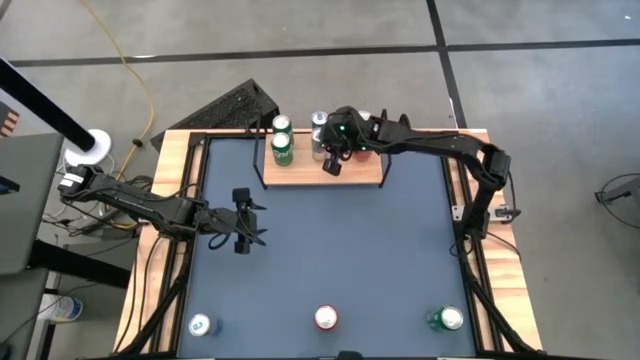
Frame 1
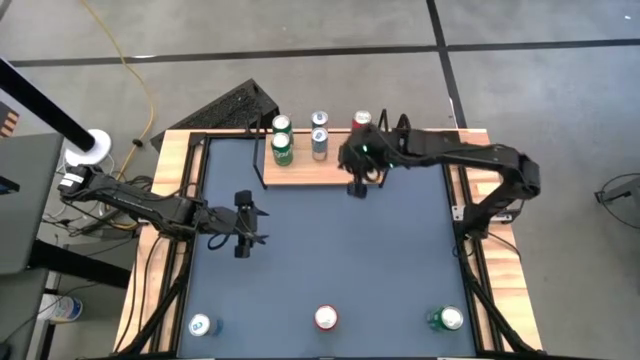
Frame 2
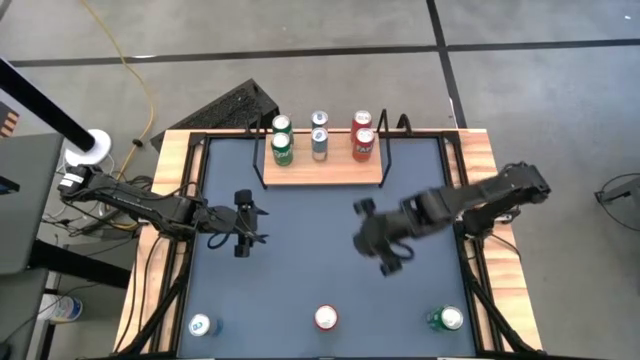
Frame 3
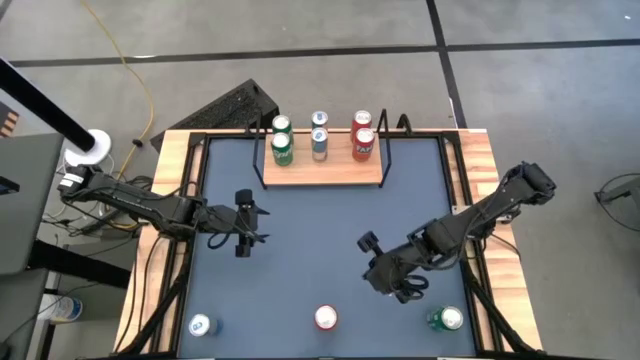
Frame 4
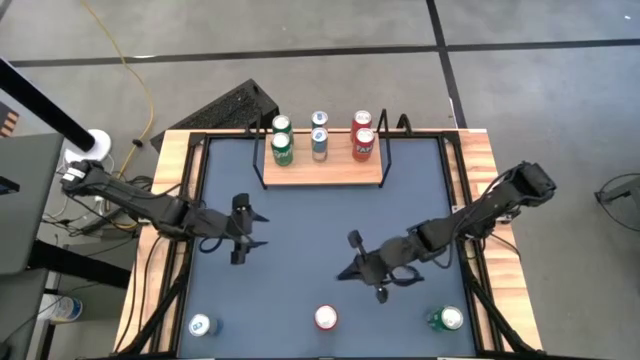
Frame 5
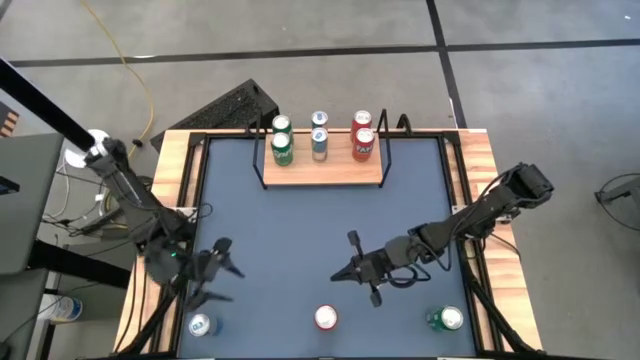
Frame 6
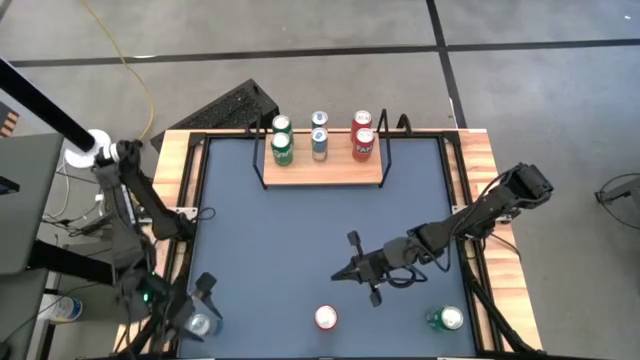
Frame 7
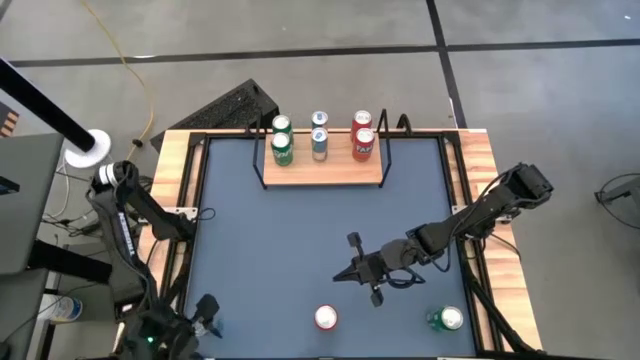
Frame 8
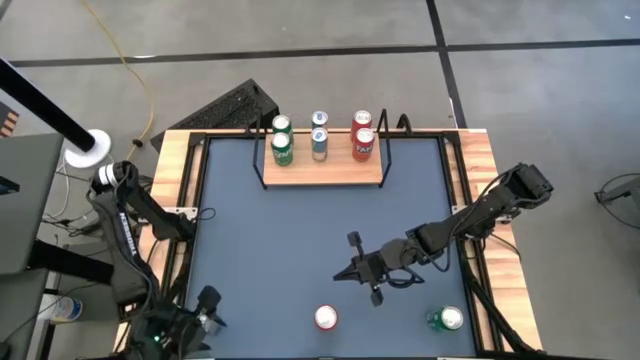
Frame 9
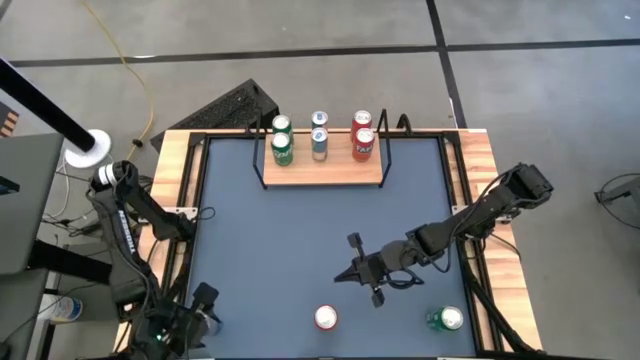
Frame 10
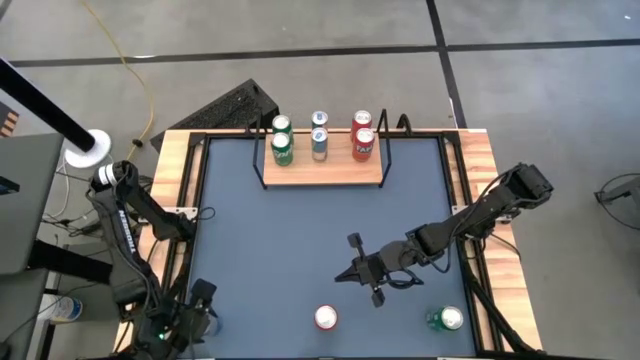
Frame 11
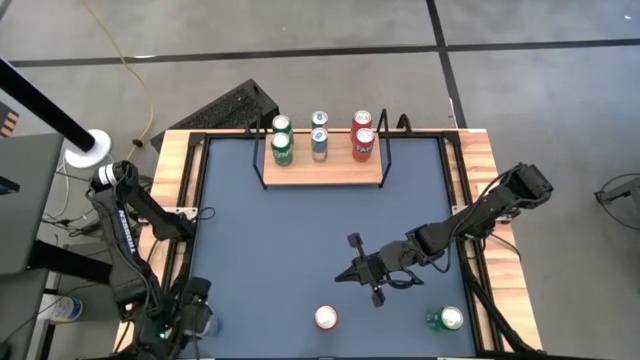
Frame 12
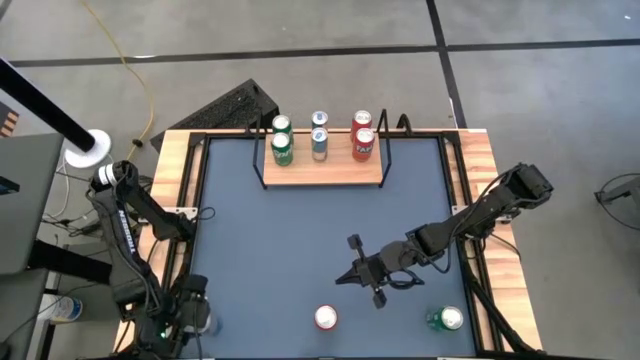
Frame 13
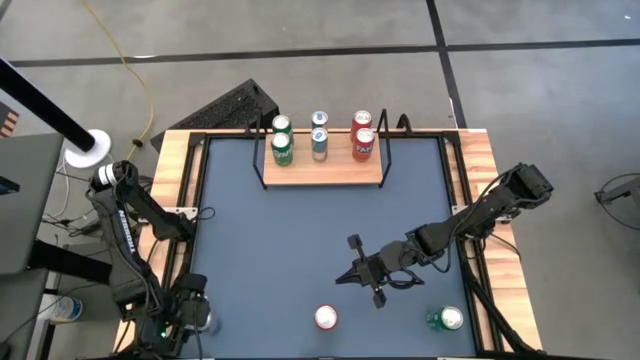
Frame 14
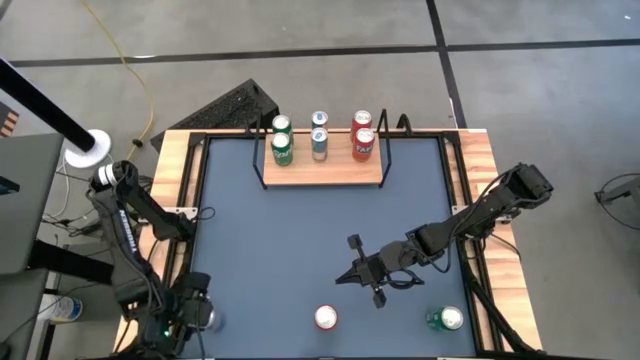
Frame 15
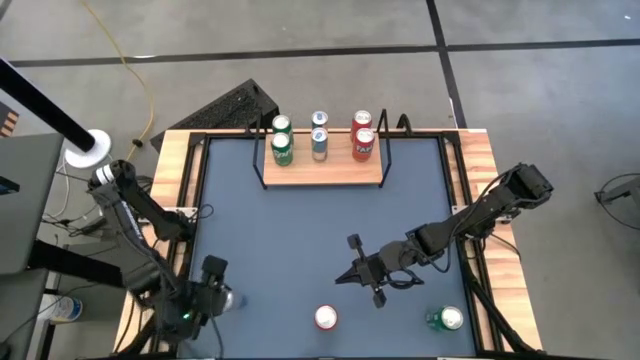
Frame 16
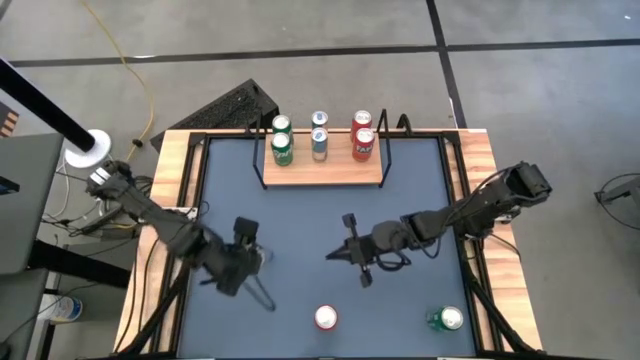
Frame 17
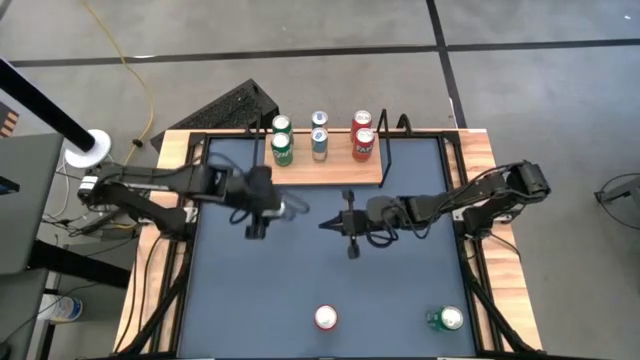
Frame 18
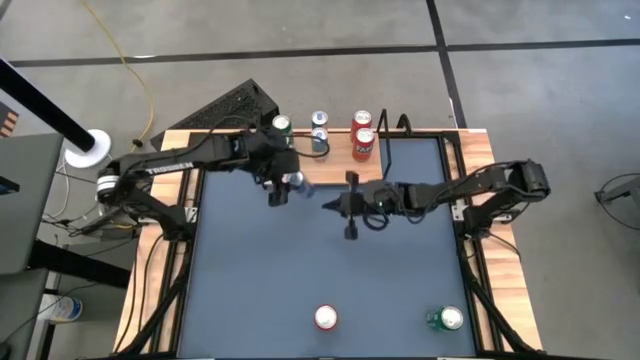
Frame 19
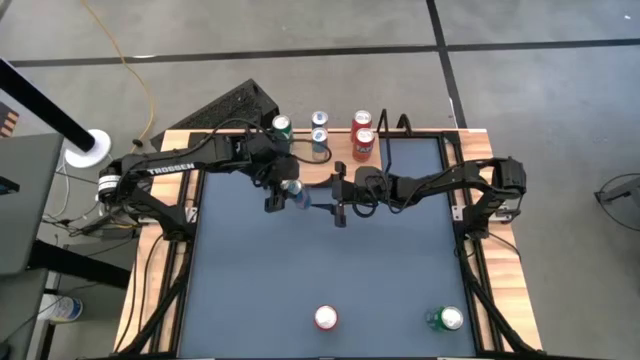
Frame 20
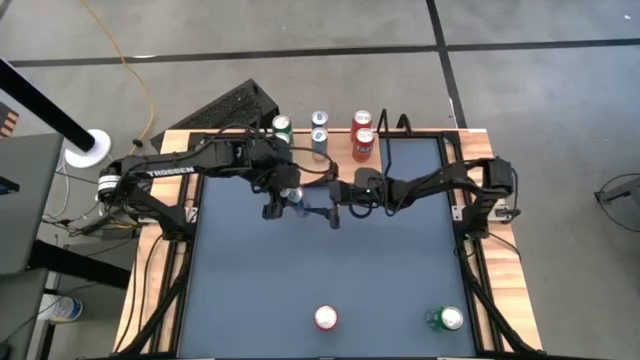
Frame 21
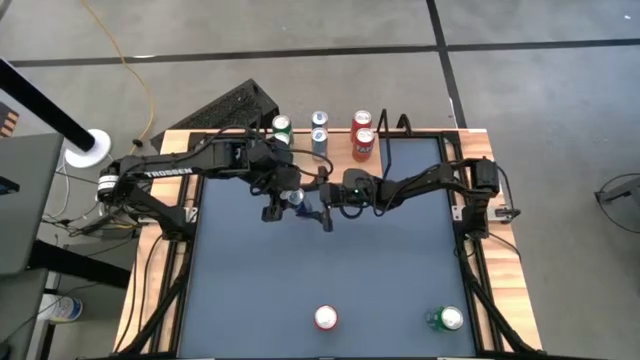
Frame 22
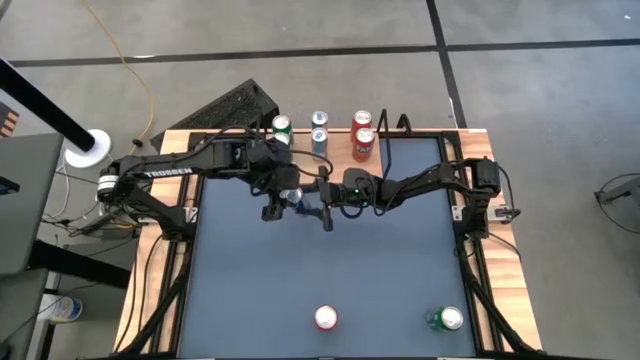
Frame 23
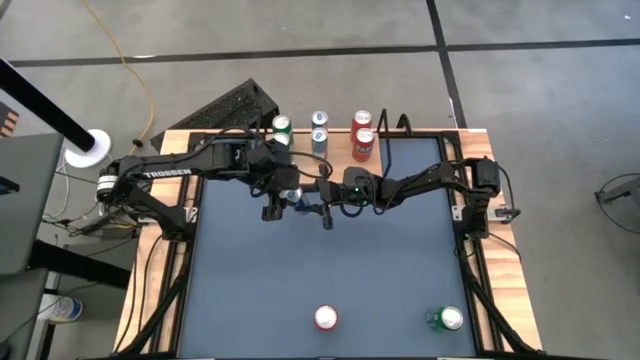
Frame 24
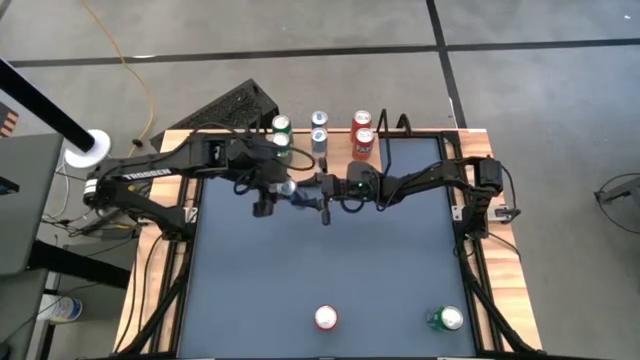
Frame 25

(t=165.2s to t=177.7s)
Task: Place canned beverage on shelf
Put the blue soda can on the shelf aligned with the other blue soda cans

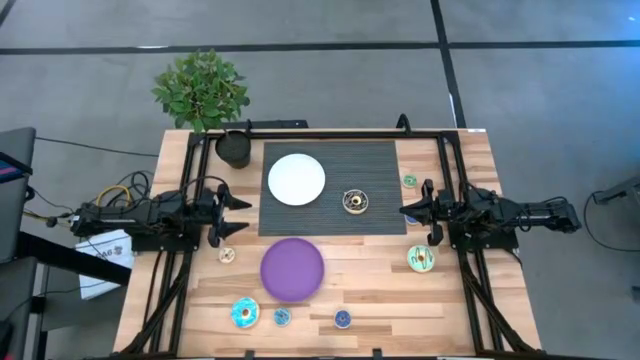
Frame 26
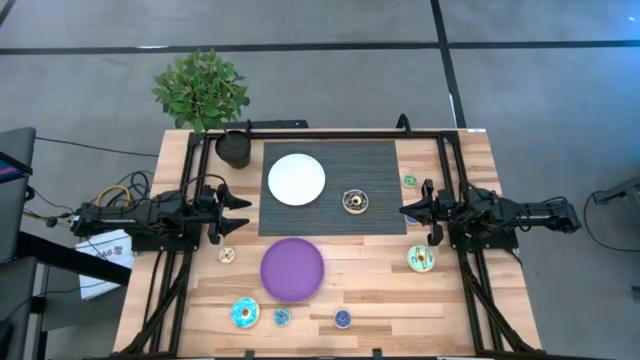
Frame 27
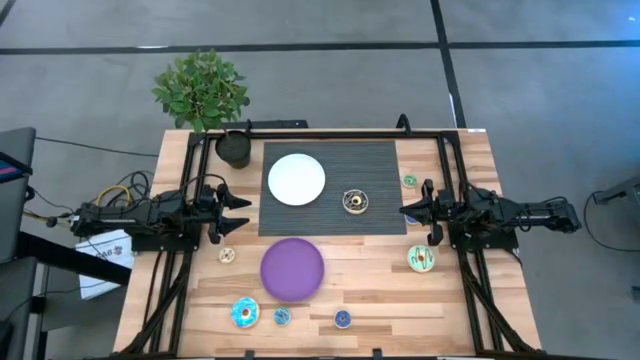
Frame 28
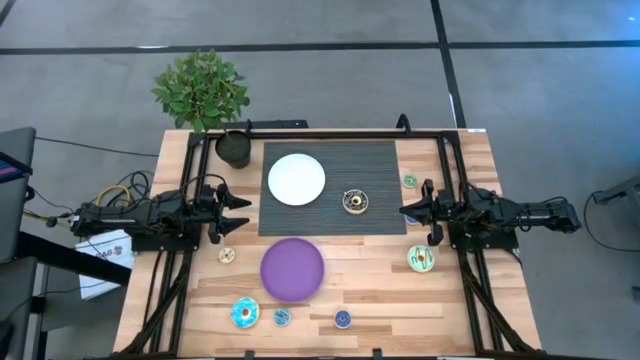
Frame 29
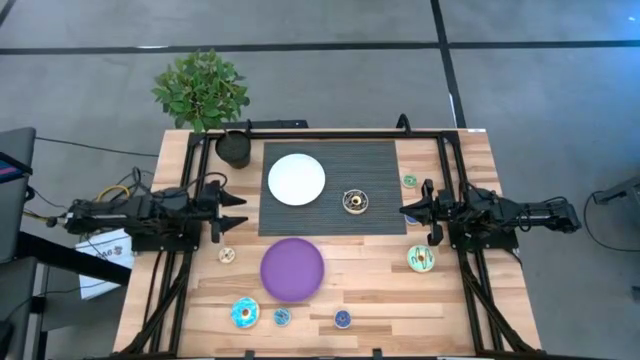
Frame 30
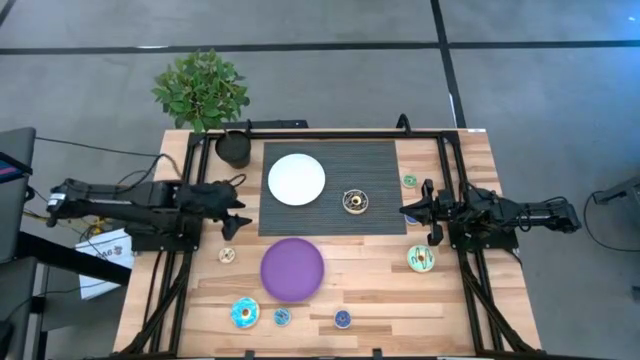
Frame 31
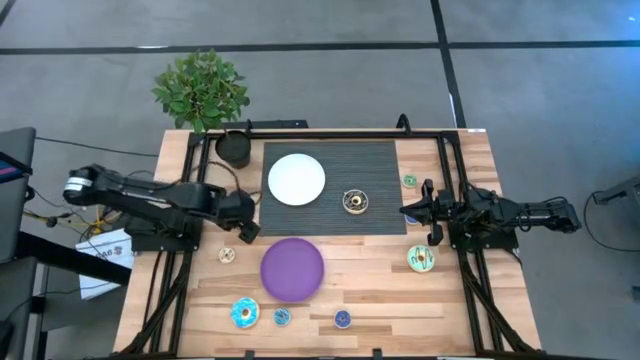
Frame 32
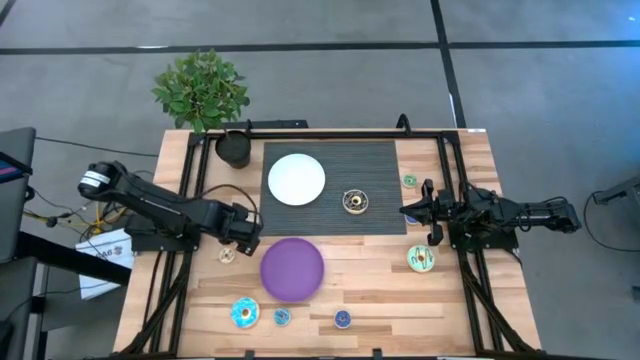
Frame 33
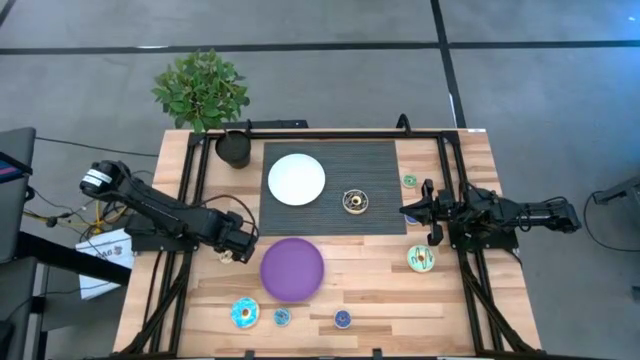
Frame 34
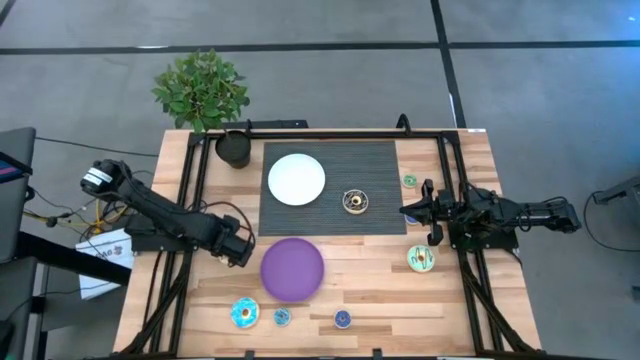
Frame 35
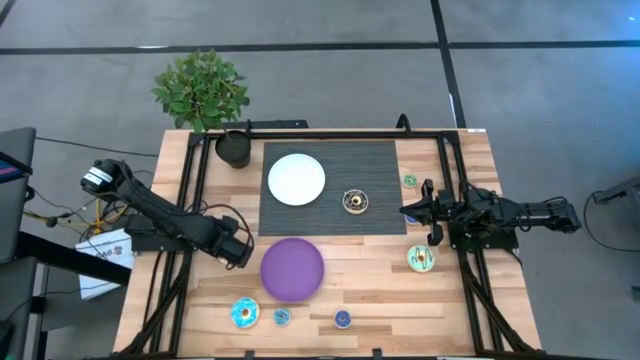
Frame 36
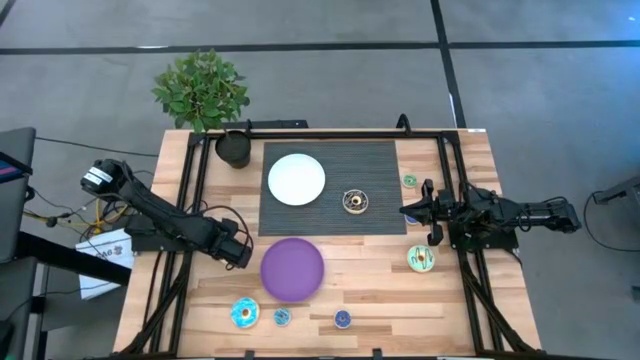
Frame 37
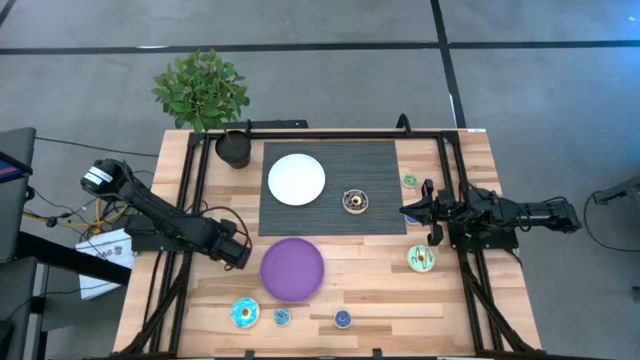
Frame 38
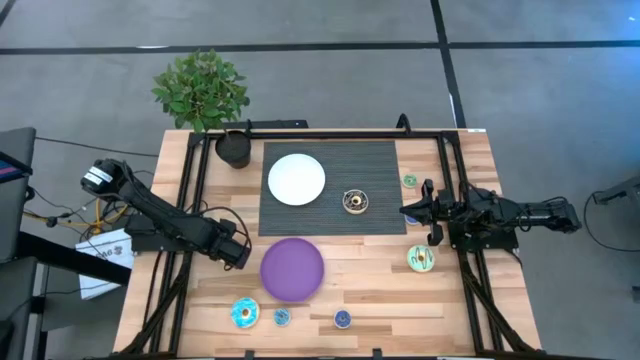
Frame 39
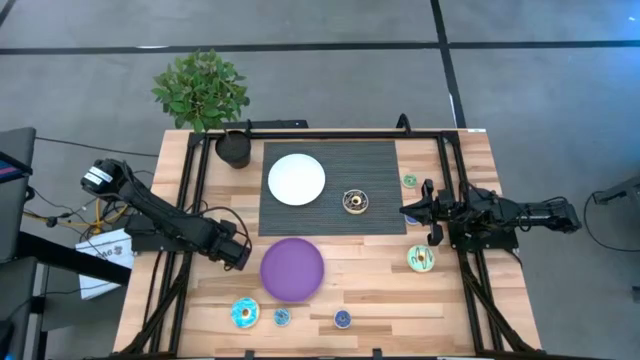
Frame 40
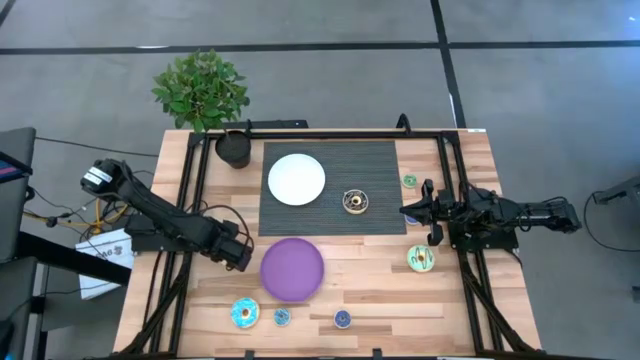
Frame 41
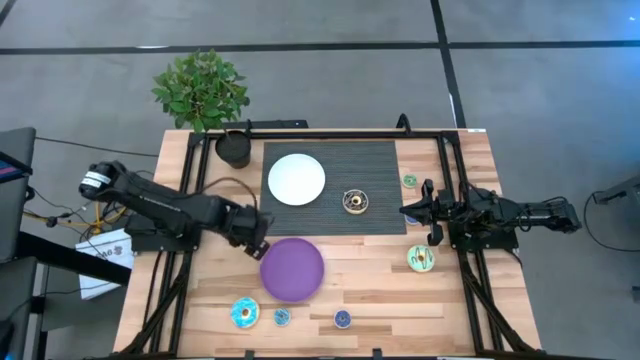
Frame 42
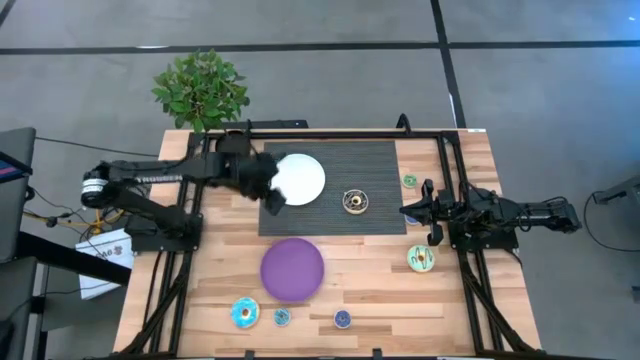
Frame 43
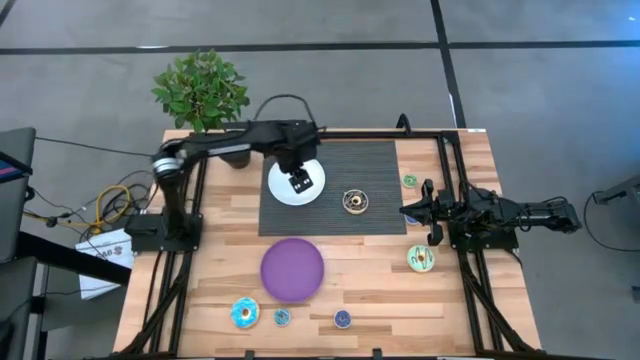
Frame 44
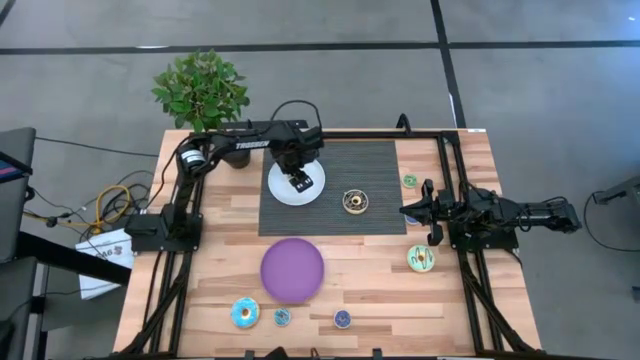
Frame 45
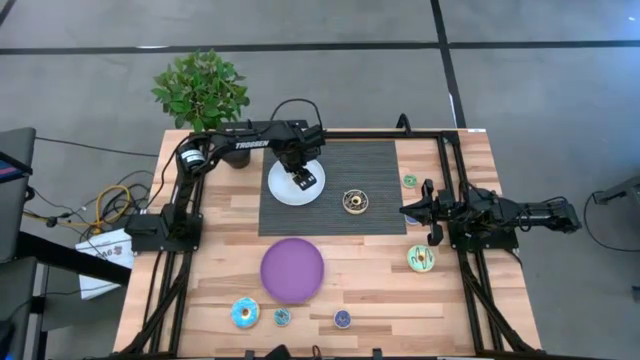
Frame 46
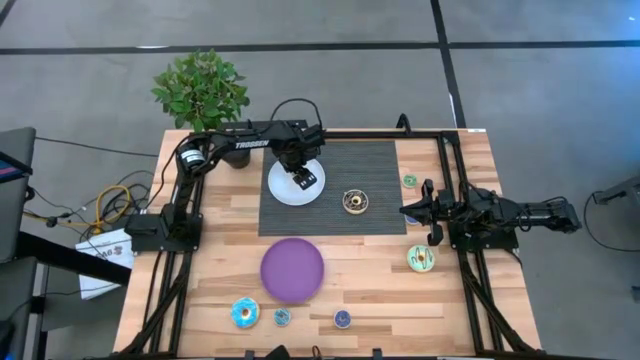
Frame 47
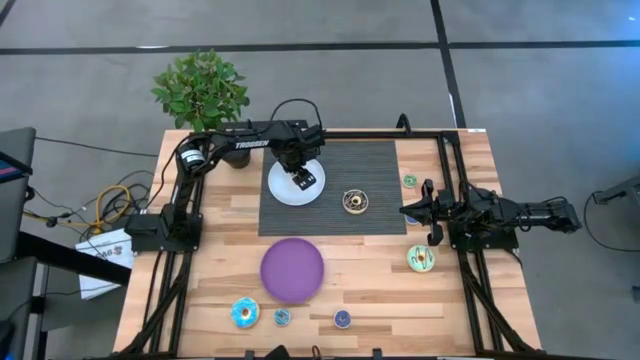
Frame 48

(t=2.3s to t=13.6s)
Task: Pick & Place donuts
Put the small white donut on the white plate
